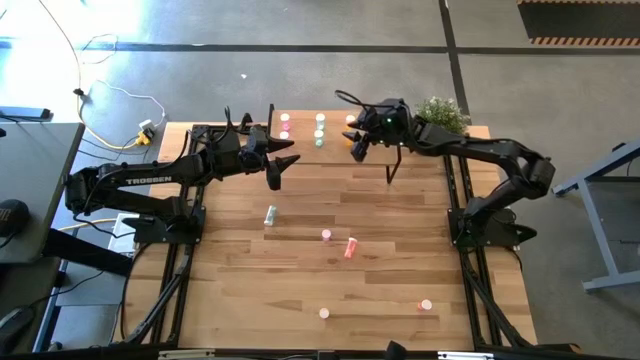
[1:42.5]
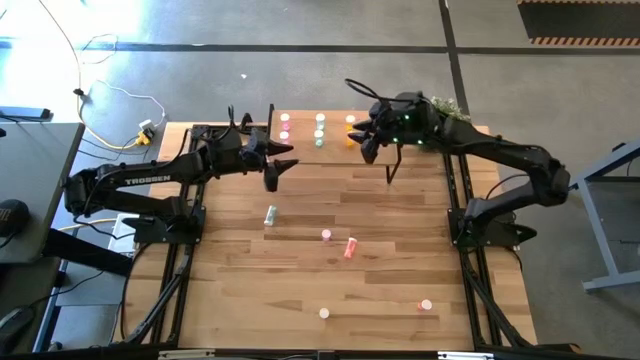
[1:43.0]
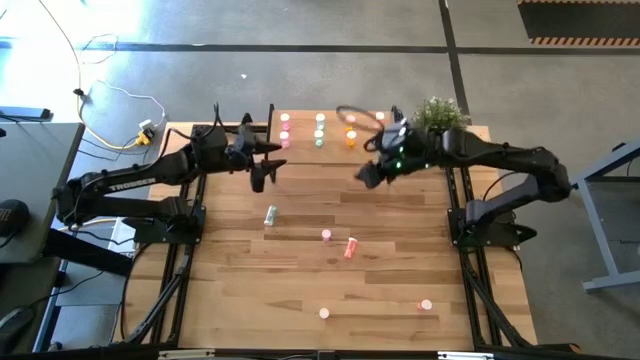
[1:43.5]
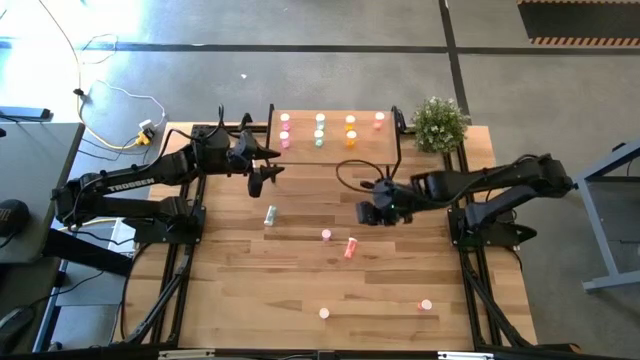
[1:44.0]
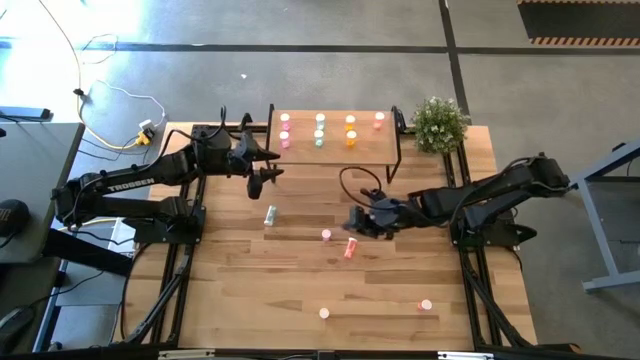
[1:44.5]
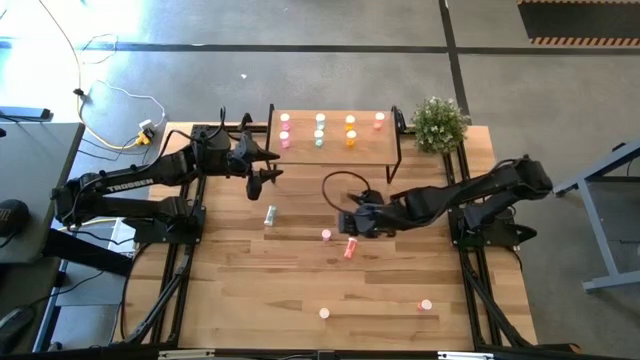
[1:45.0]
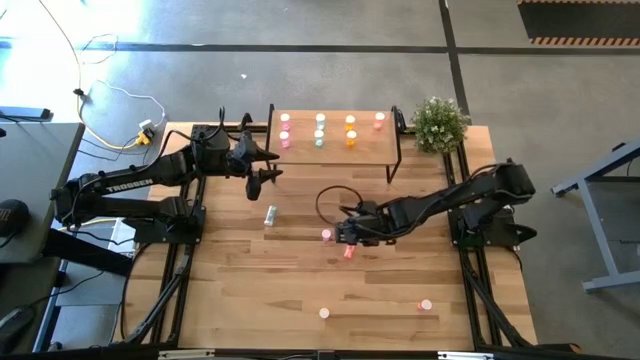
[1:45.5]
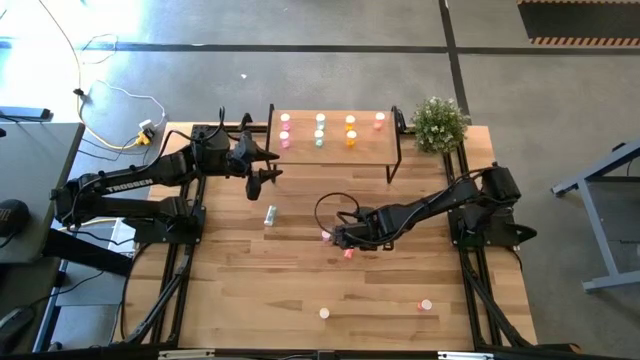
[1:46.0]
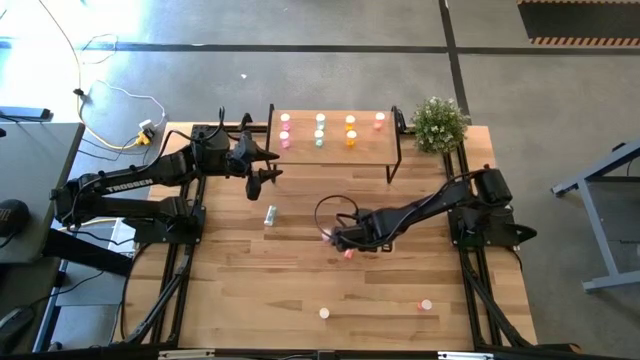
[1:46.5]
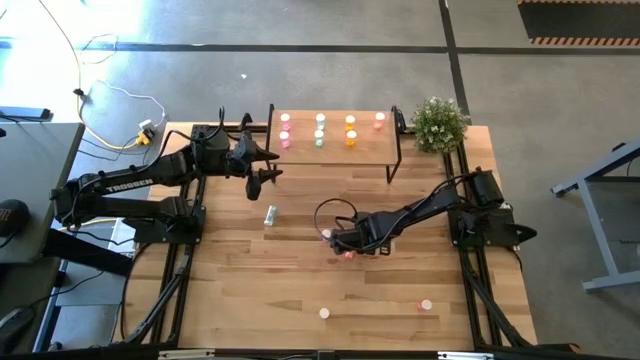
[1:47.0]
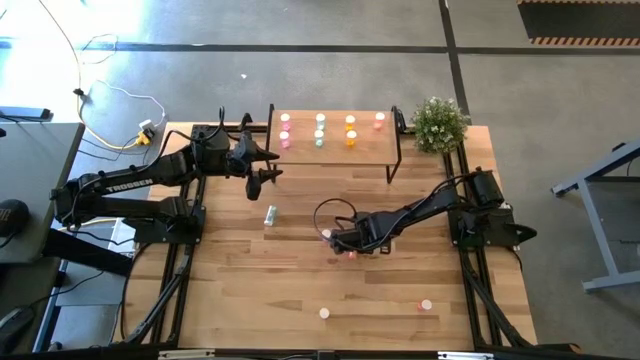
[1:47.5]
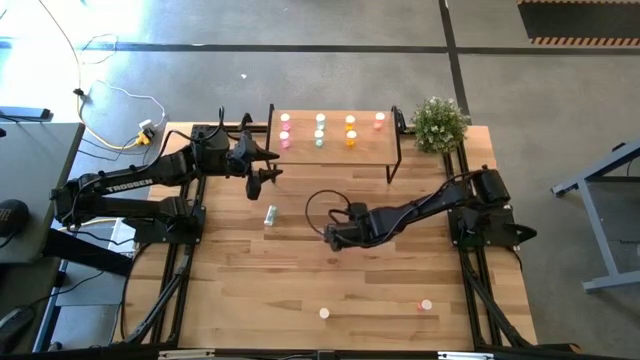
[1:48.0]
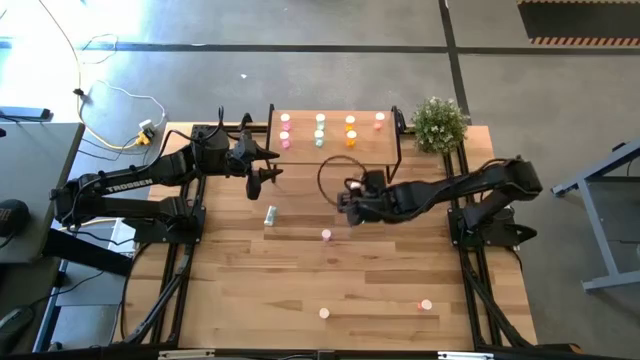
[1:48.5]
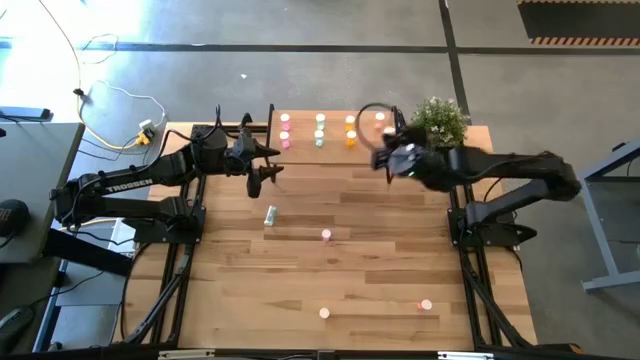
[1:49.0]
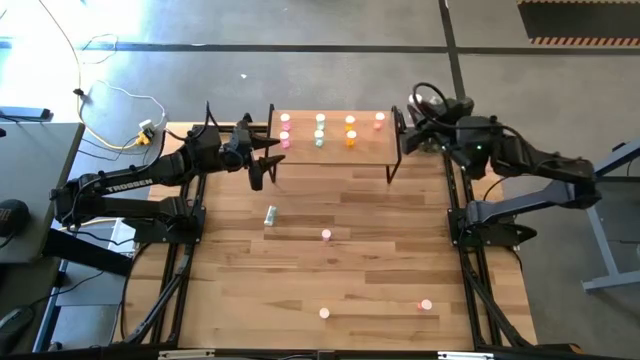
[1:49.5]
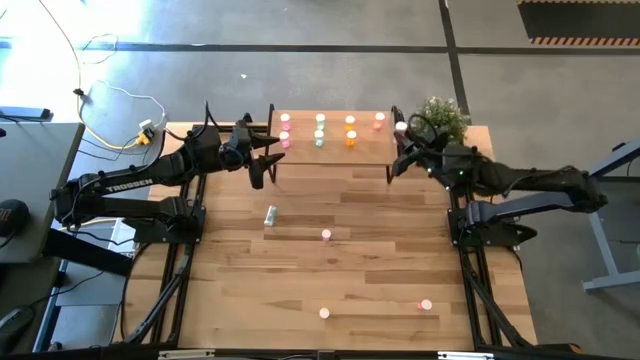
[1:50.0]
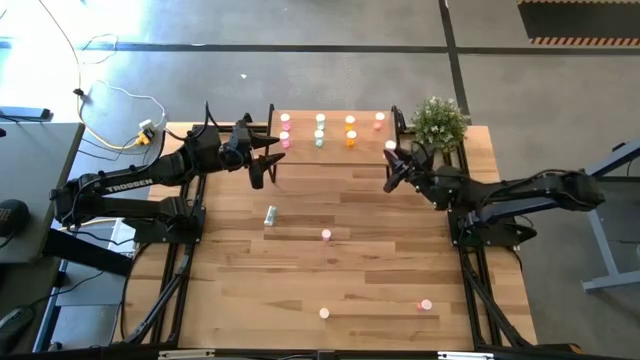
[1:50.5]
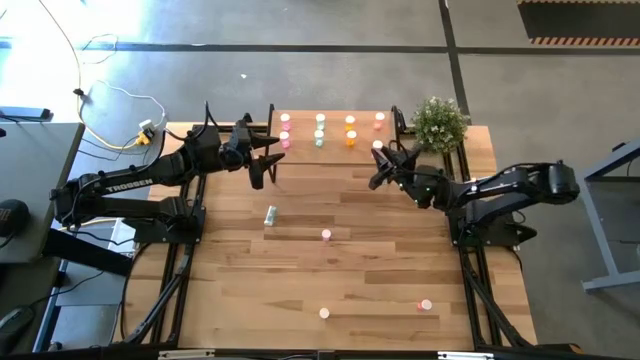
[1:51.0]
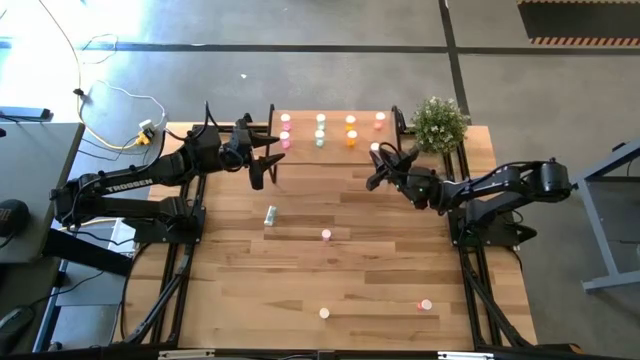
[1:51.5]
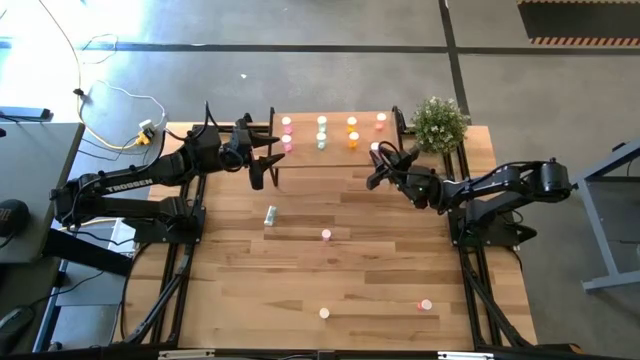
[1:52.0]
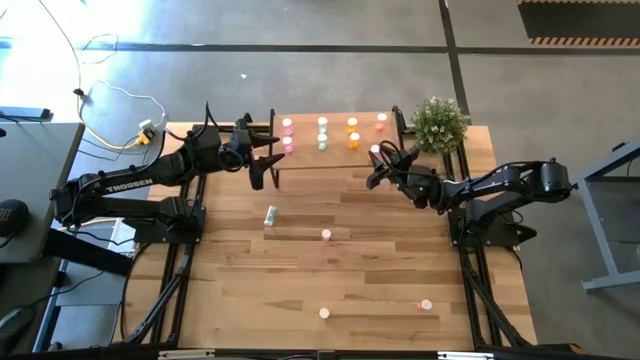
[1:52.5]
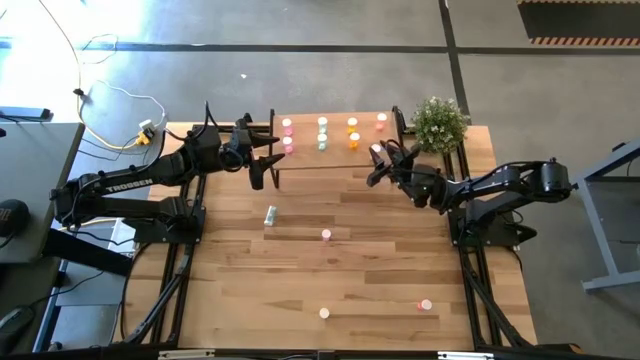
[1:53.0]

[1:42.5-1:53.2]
Task: Pick and place medicine bottles onto shelf by color
Put the left orange pill bottle on the shelf aligned with the orange pill bottle

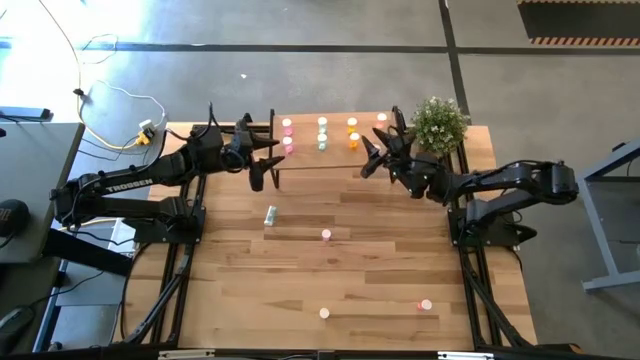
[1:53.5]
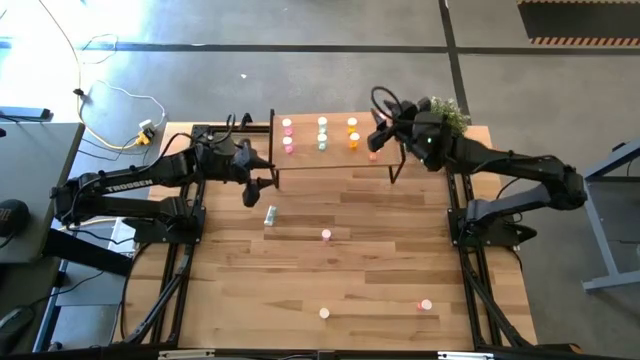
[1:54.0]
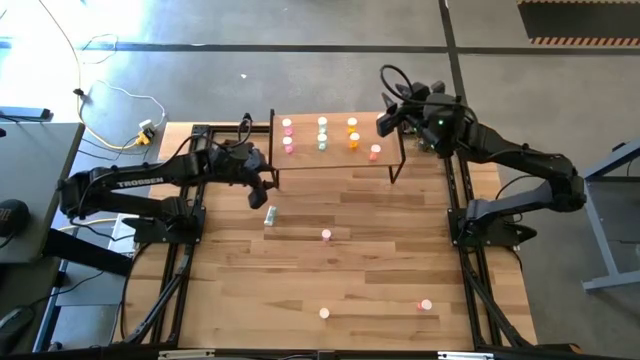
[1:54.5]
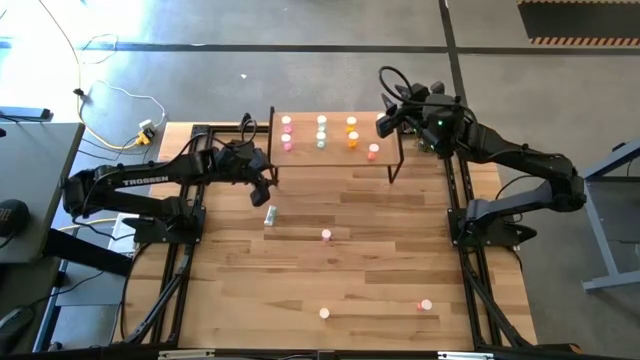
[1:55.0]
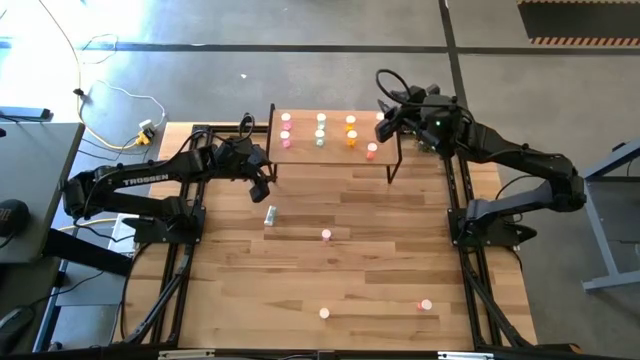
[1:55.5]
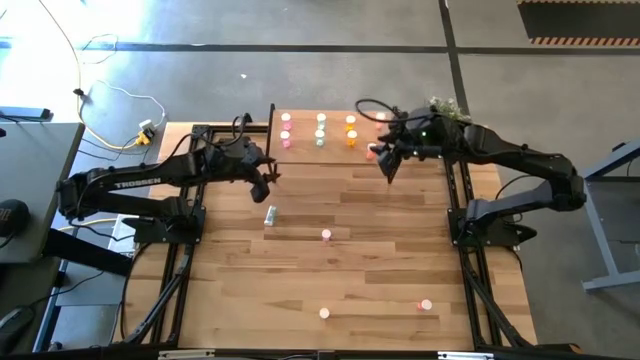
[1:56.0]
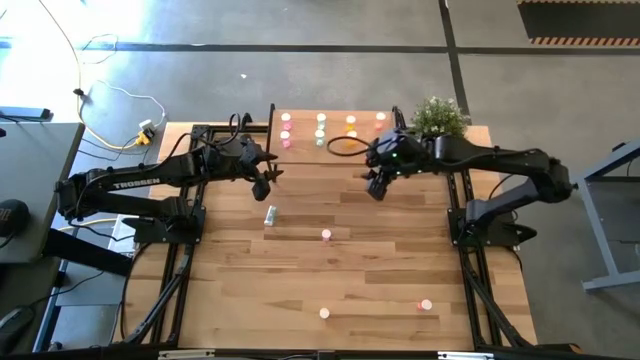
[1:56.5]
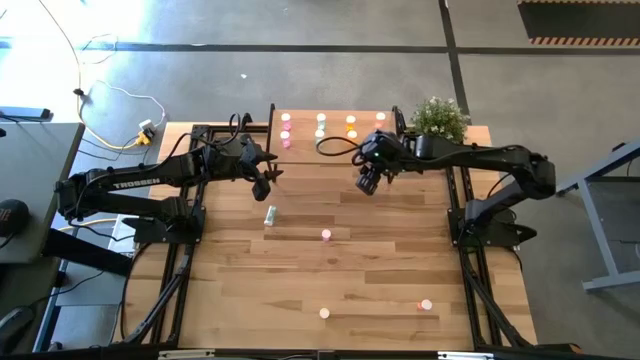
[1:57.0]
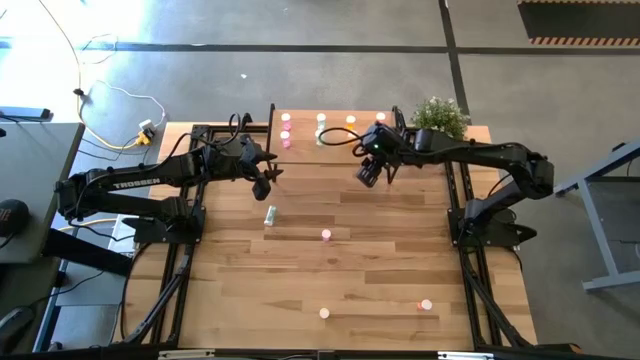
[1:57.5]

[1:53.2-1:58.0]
Adjust the orange pill bottle

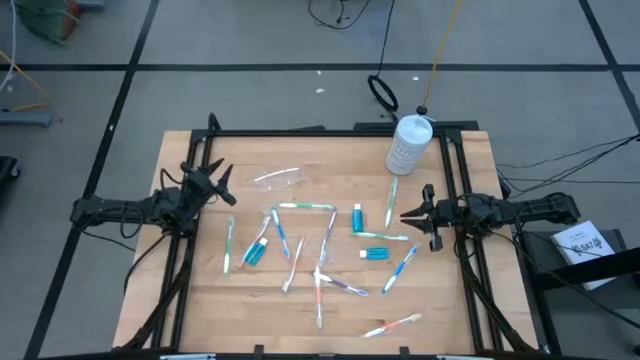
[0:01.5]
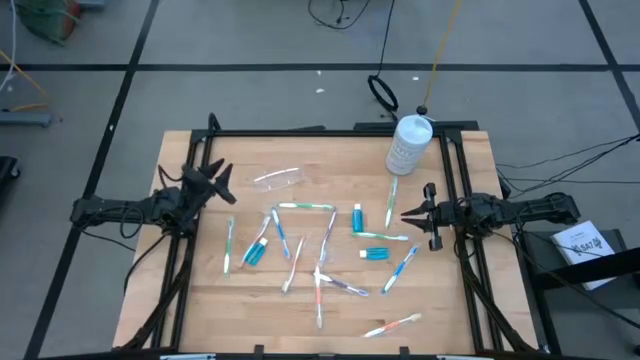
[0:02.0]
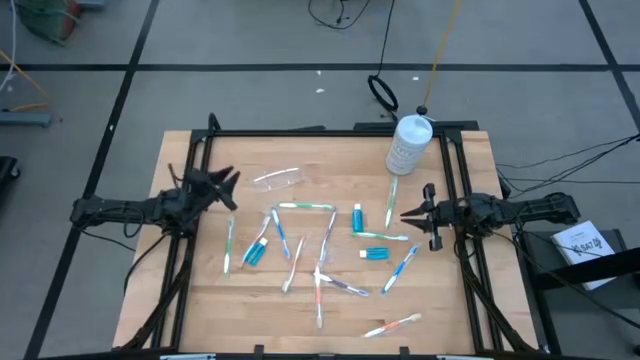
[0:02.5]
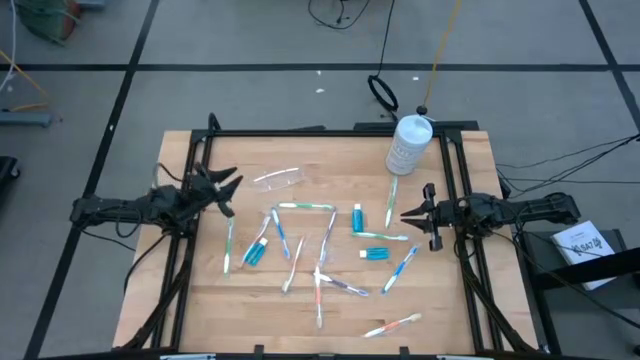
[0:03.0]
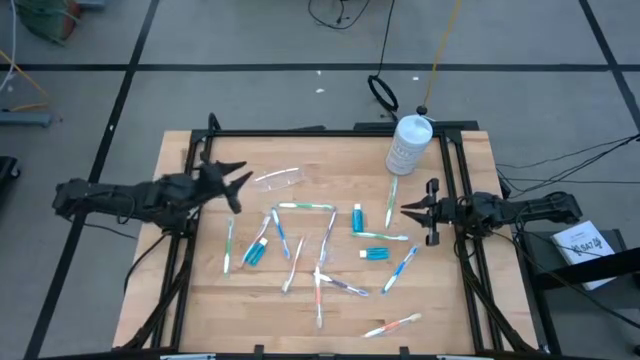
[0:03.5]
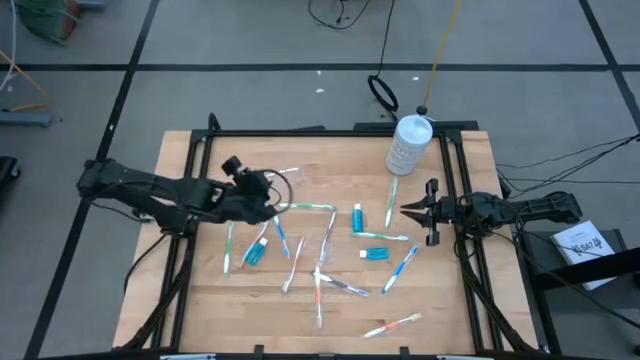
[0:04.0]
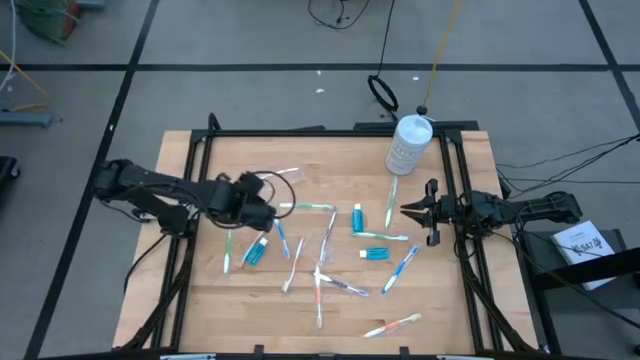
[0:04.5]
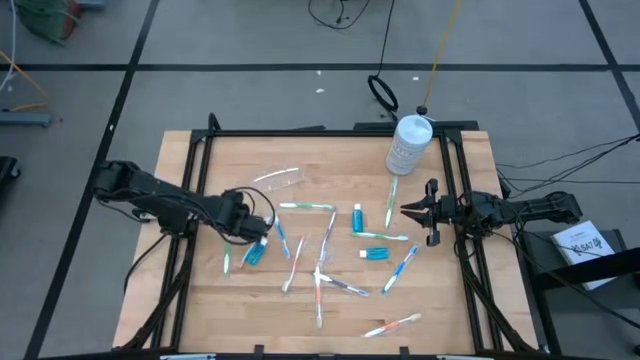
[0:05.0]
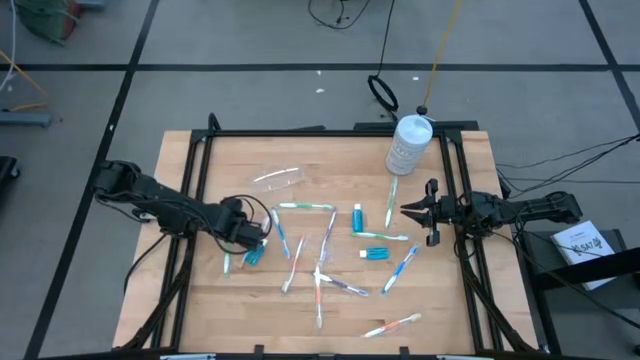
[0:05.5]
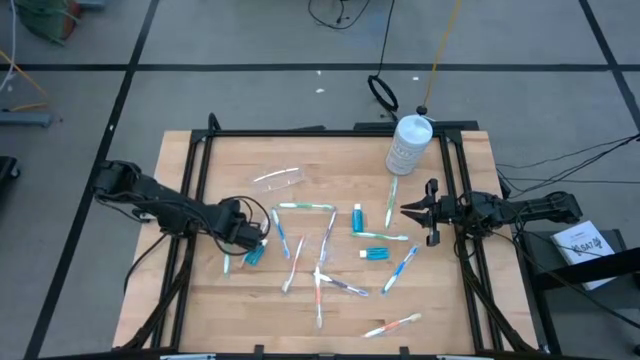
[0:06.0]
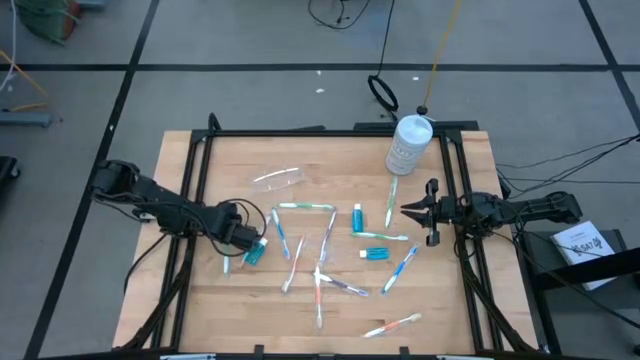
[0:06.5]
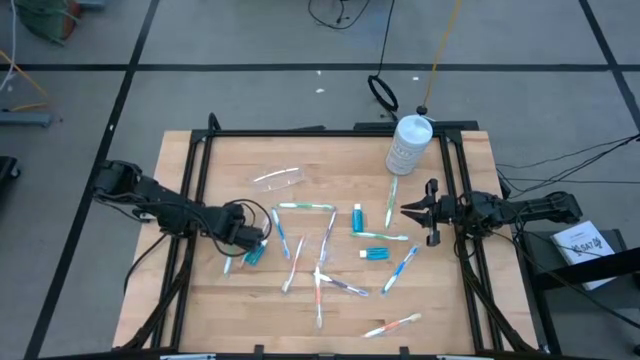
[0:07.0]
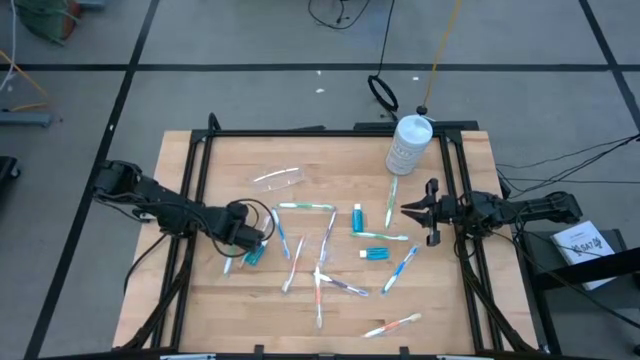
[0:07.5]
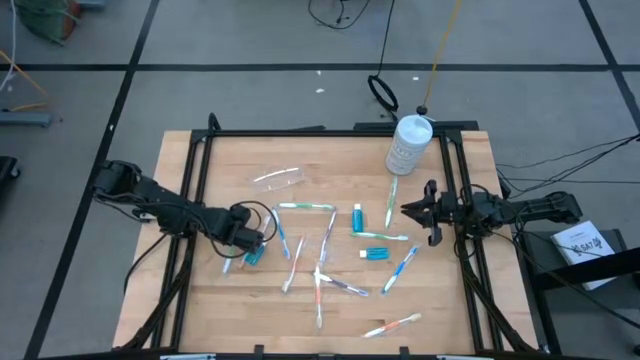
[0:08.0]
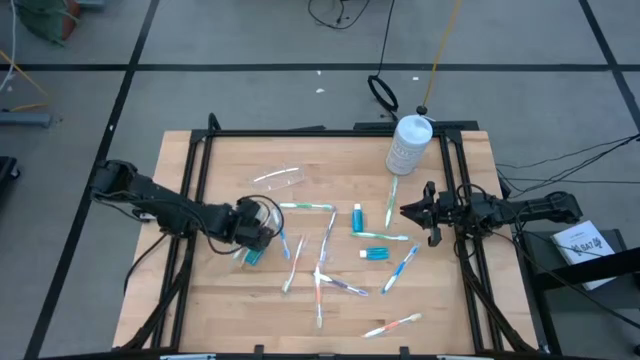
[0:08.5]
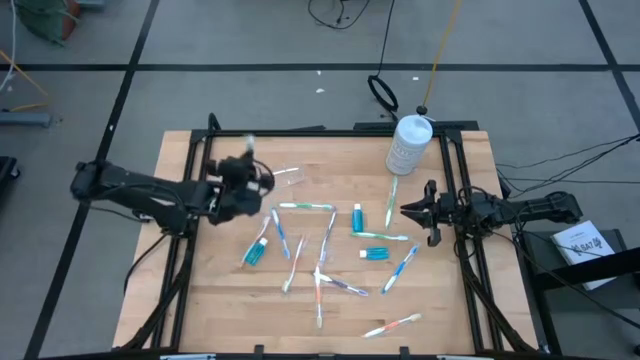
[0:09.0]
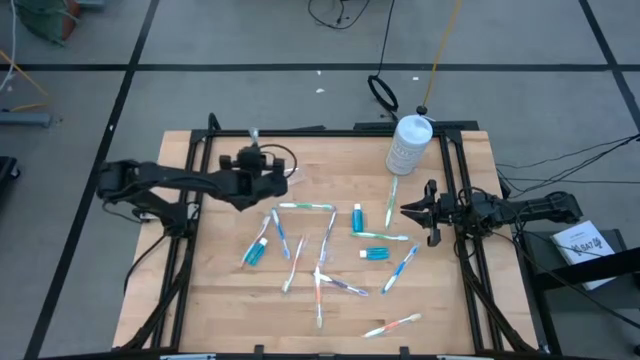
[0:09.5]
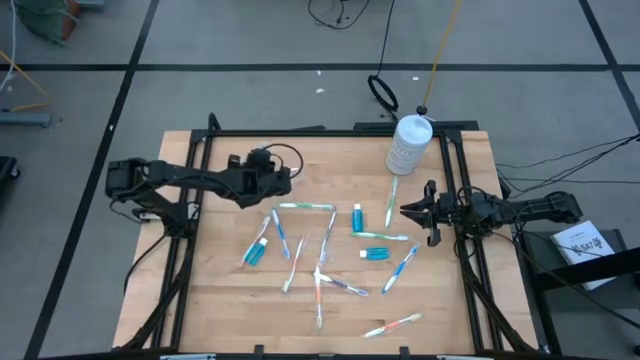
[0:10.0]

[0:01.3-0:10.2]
Task: Pick & Place toothbrushing station
Put the green toothbrush into the transparent organizer
